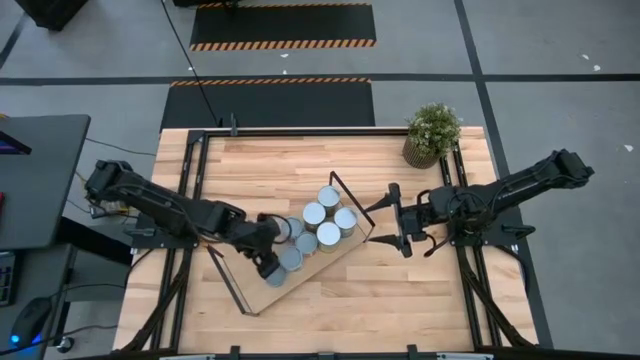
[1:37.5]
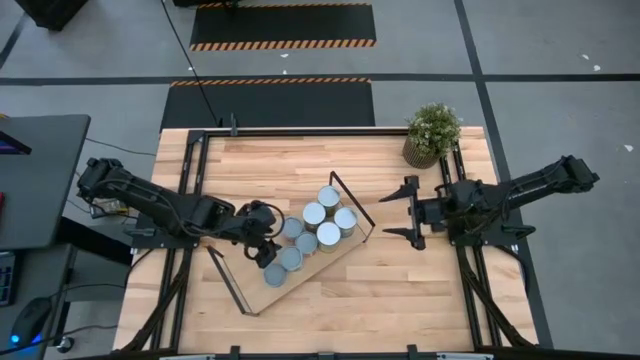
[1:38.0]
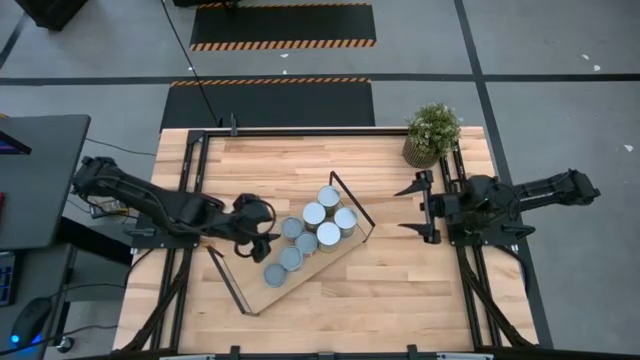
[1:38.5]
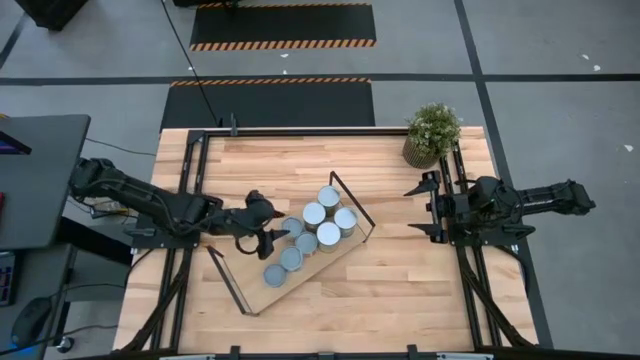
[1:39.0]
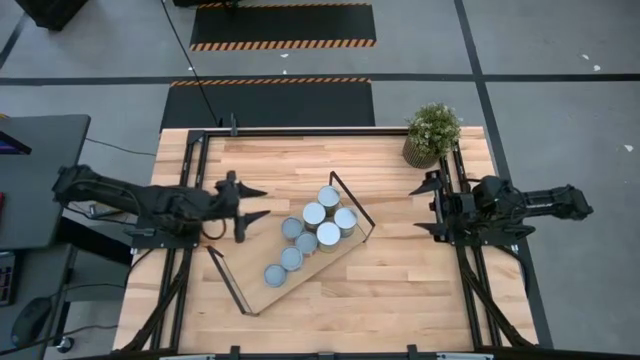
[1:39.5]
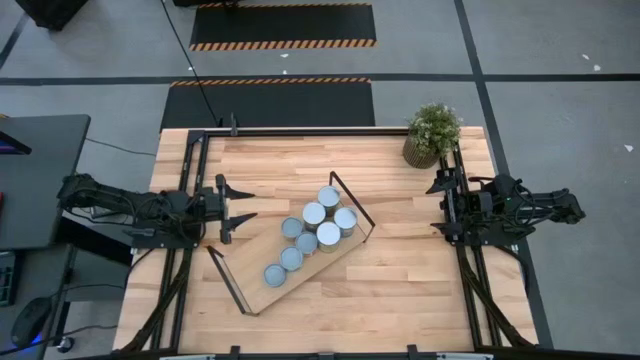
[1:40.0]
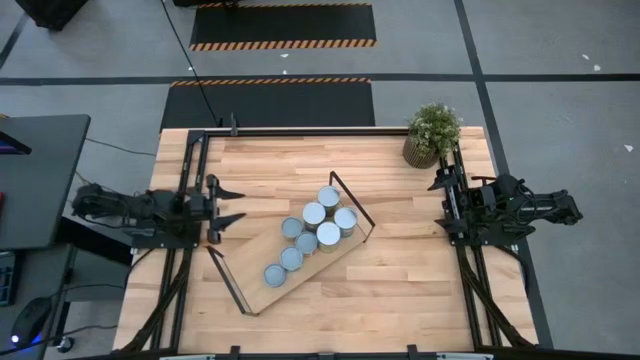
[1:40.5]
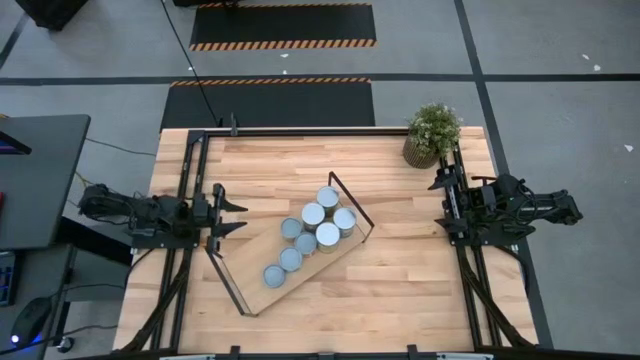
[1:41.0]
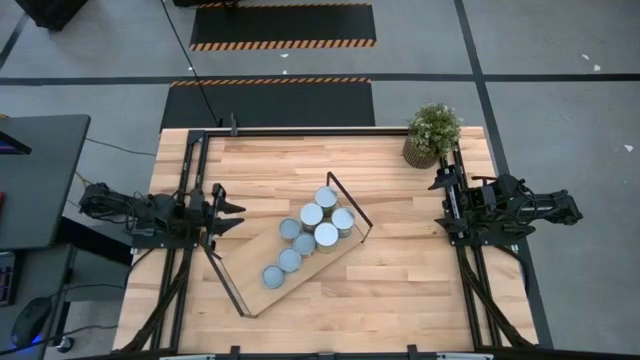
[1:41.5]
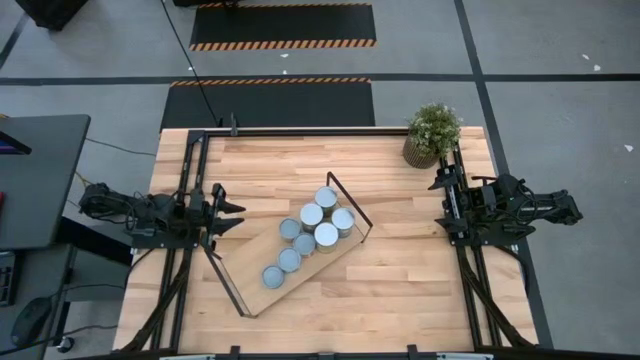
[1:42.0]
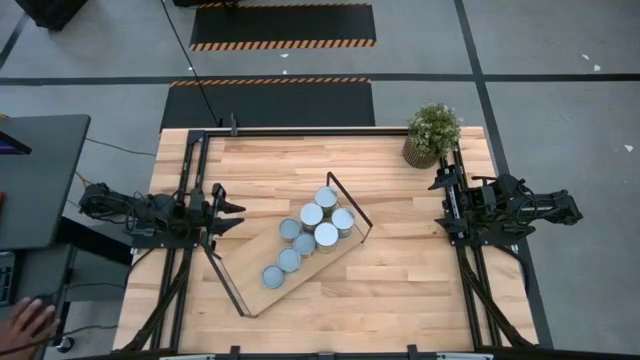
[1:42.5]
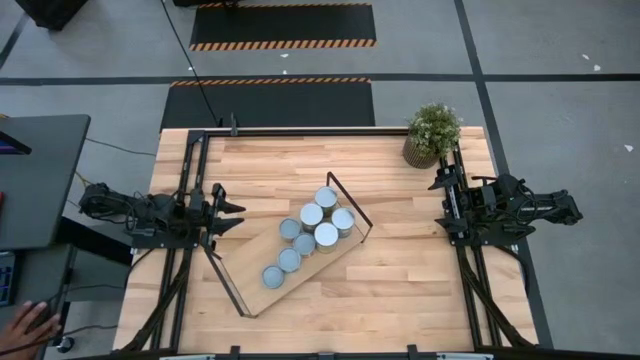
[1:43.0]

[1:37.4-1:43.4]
Task: Pick and place cans onto a shelf
Return to Home Position

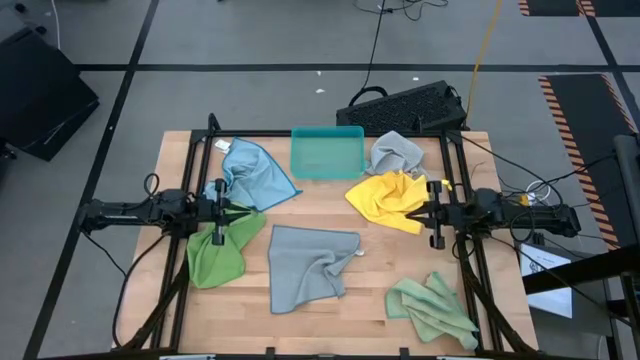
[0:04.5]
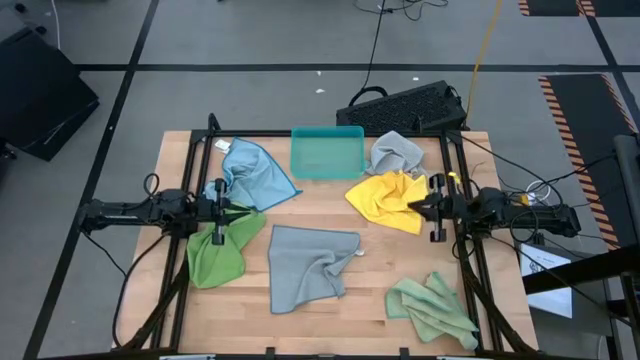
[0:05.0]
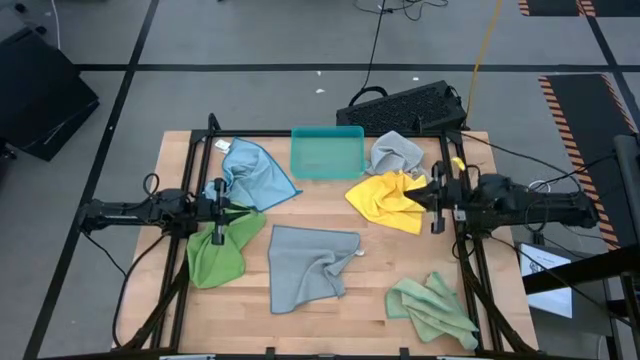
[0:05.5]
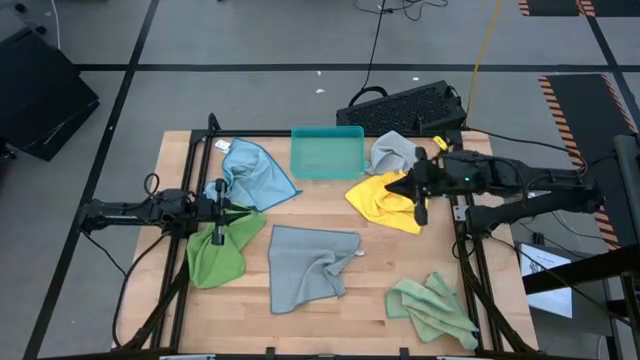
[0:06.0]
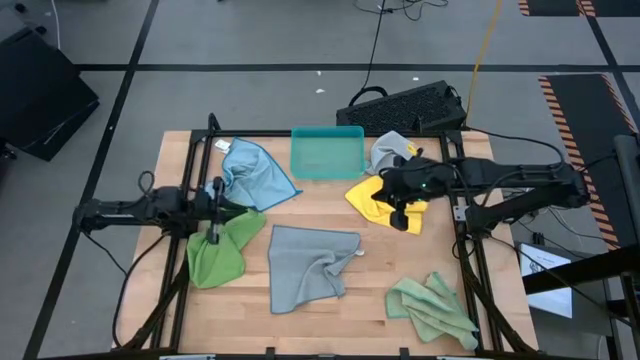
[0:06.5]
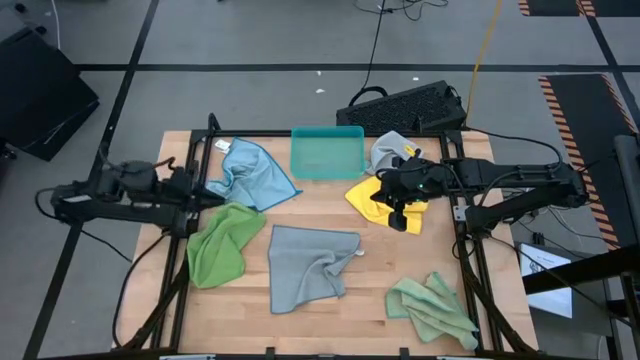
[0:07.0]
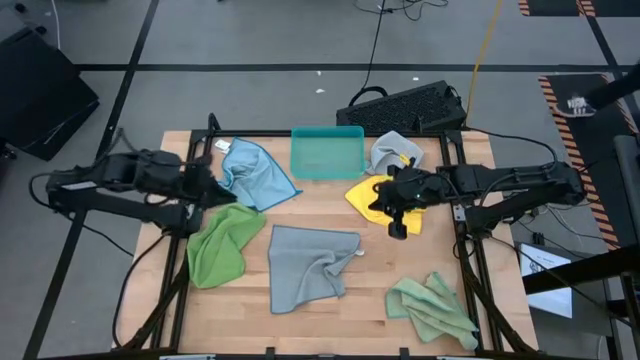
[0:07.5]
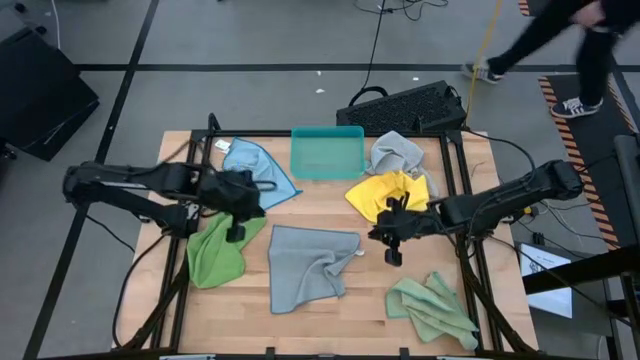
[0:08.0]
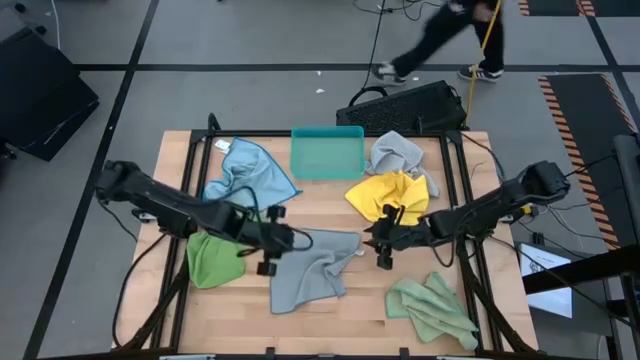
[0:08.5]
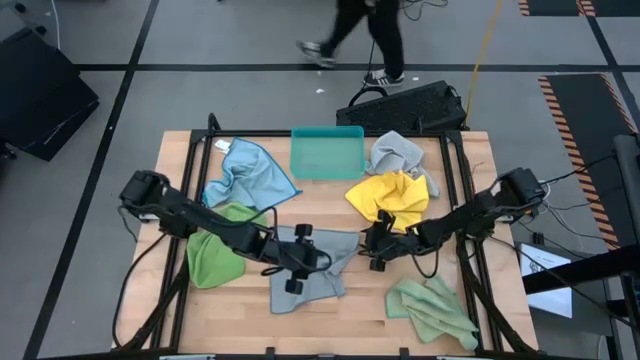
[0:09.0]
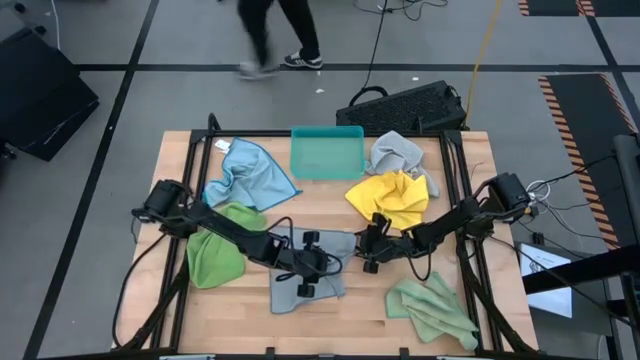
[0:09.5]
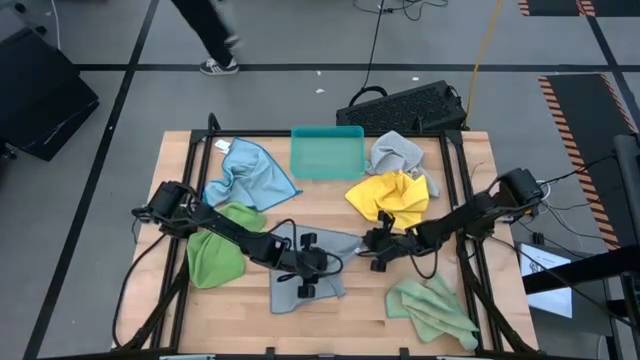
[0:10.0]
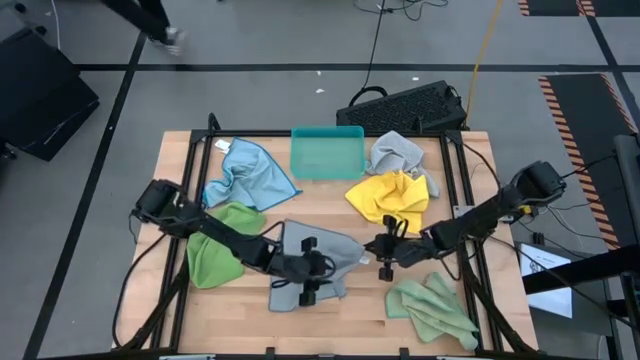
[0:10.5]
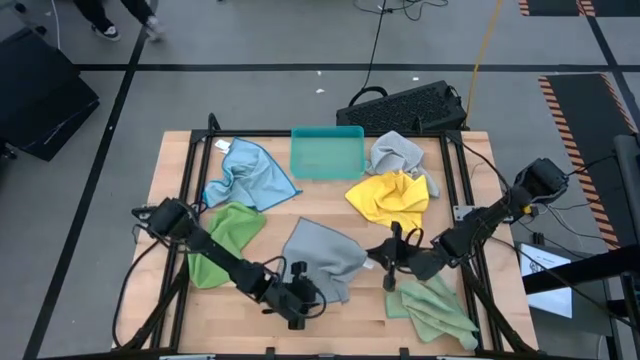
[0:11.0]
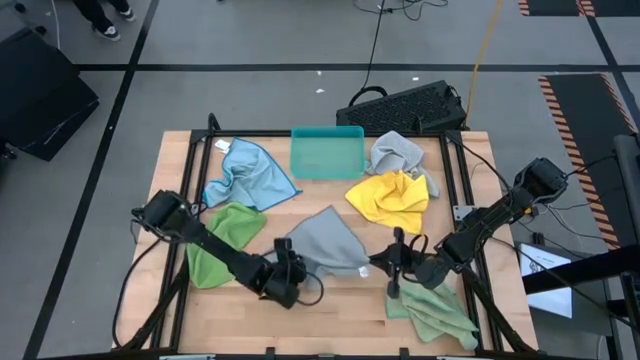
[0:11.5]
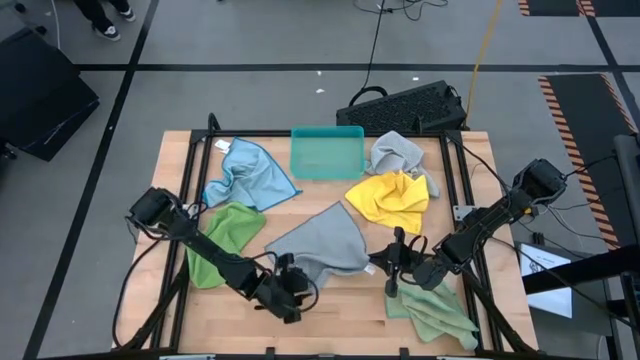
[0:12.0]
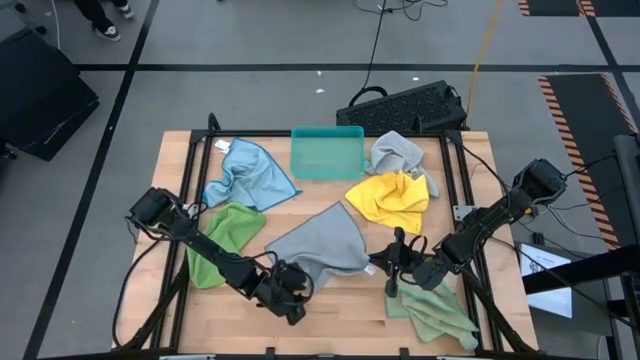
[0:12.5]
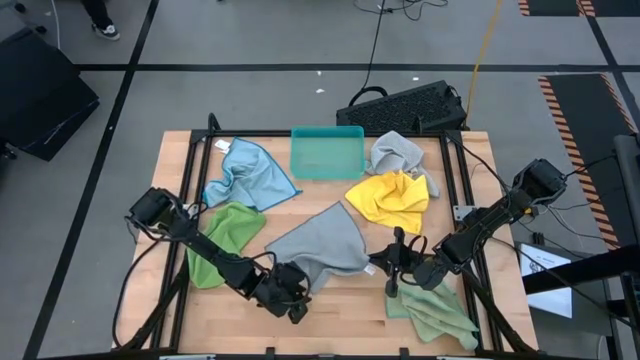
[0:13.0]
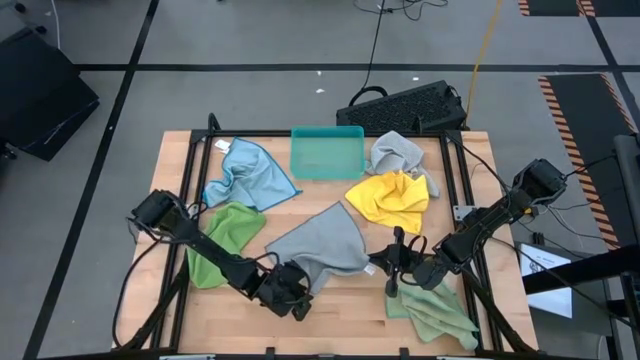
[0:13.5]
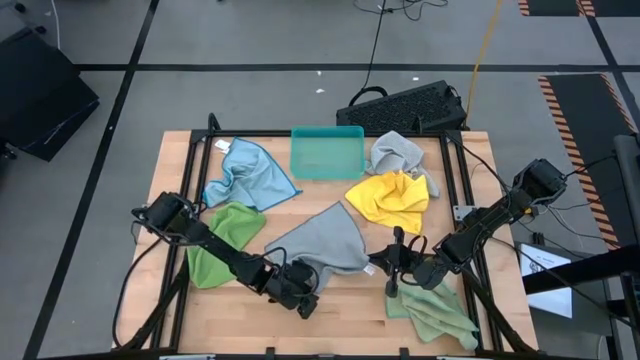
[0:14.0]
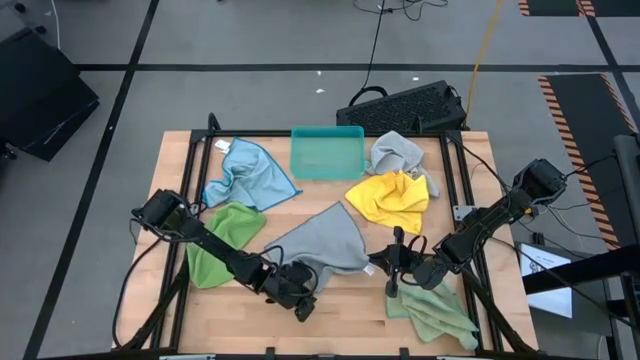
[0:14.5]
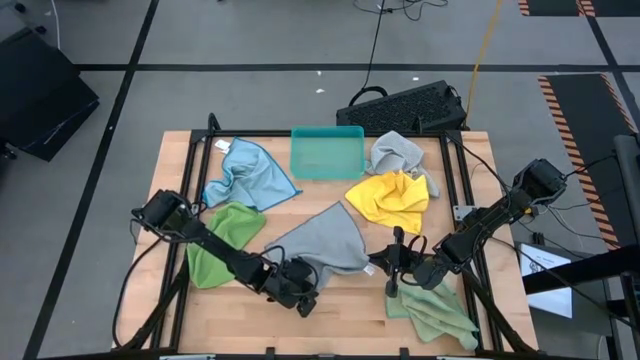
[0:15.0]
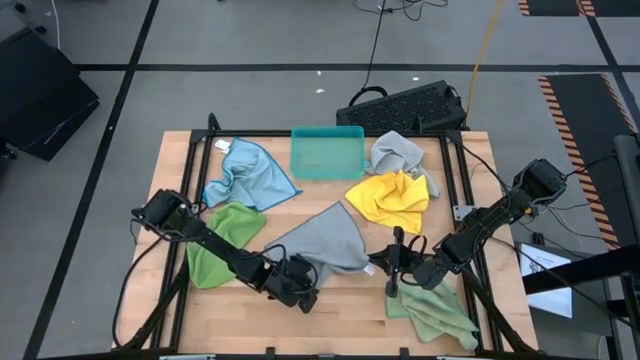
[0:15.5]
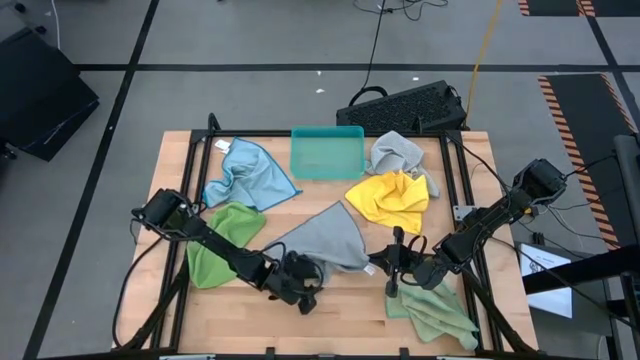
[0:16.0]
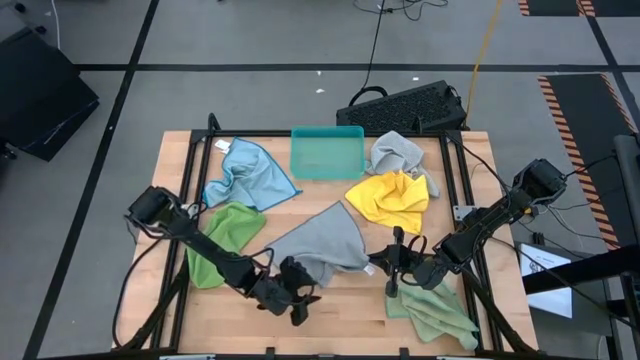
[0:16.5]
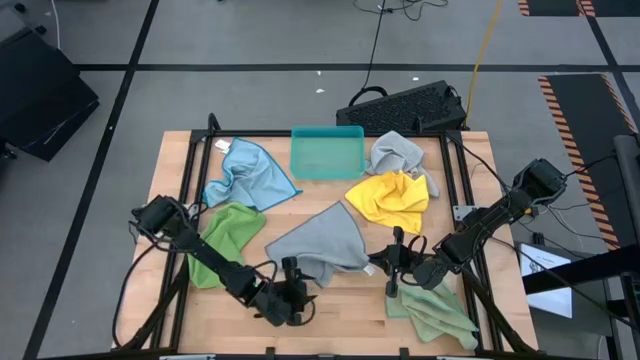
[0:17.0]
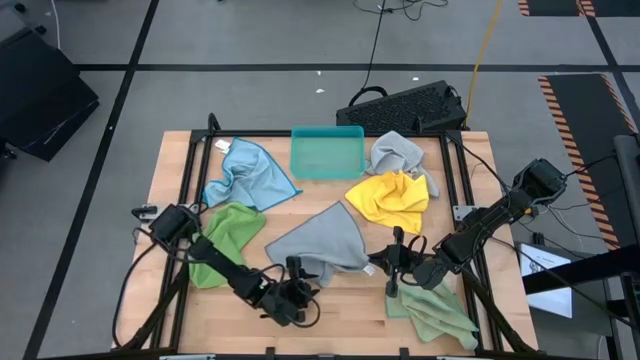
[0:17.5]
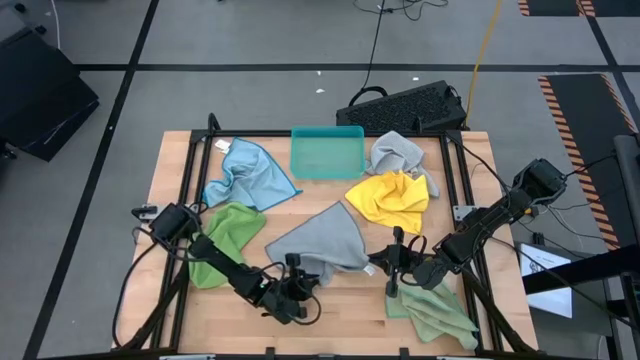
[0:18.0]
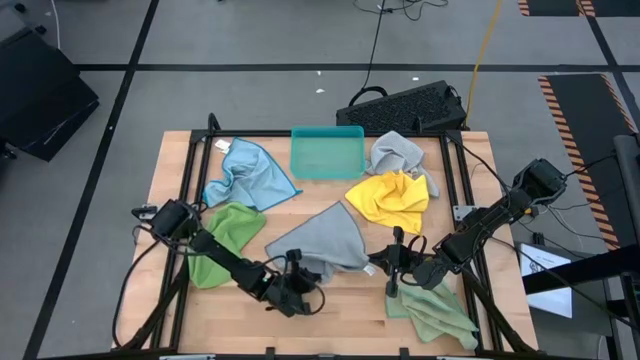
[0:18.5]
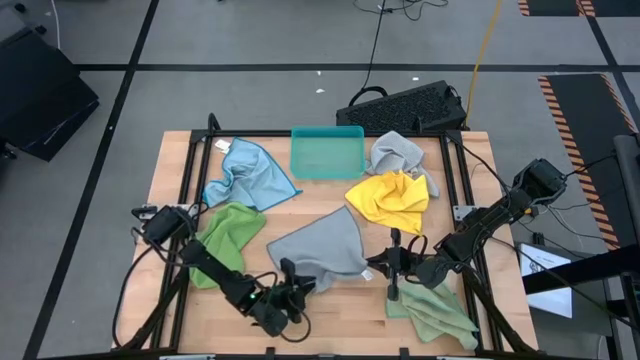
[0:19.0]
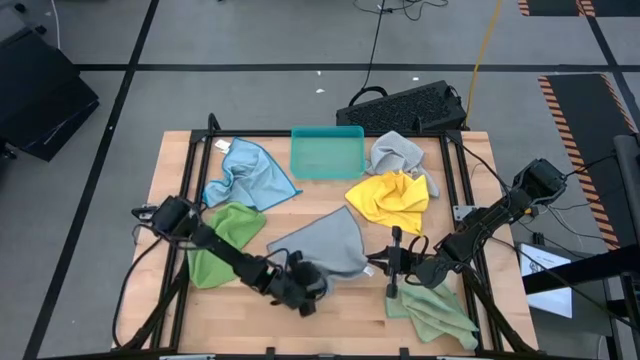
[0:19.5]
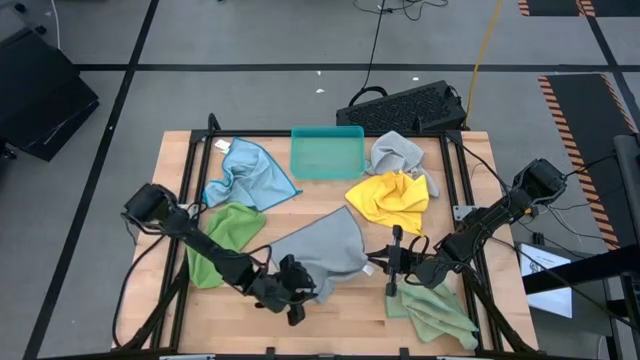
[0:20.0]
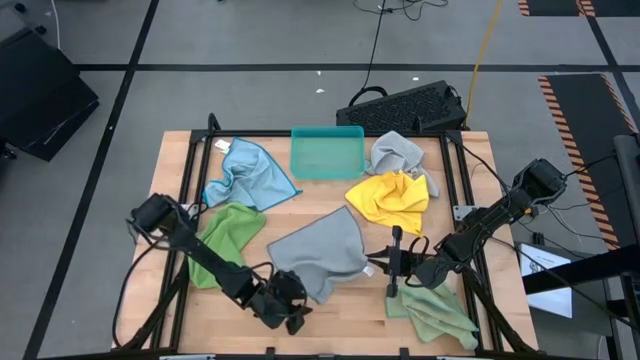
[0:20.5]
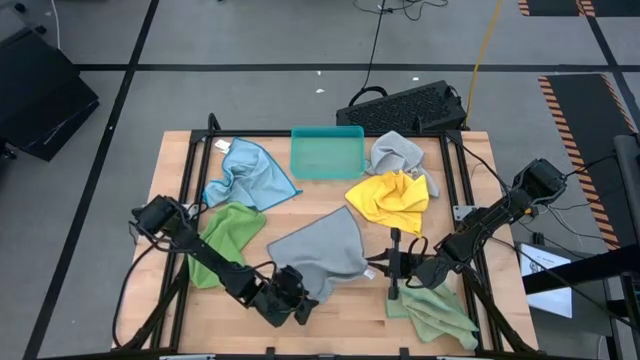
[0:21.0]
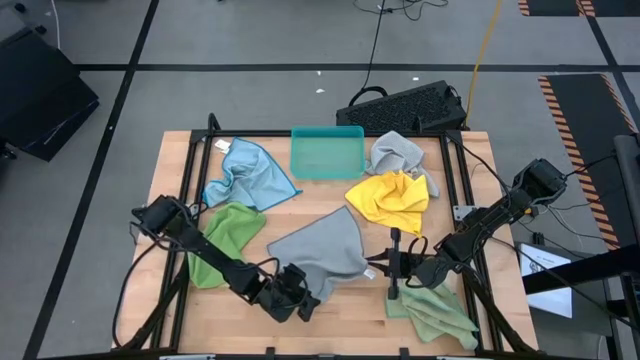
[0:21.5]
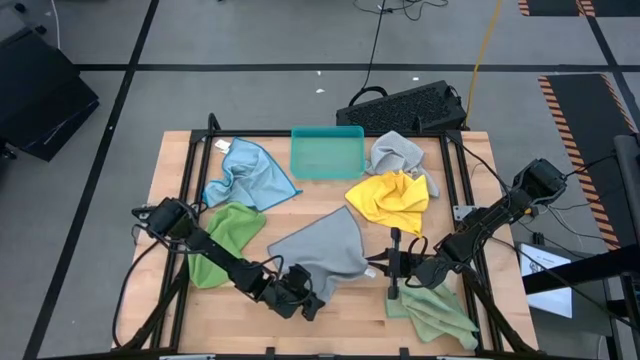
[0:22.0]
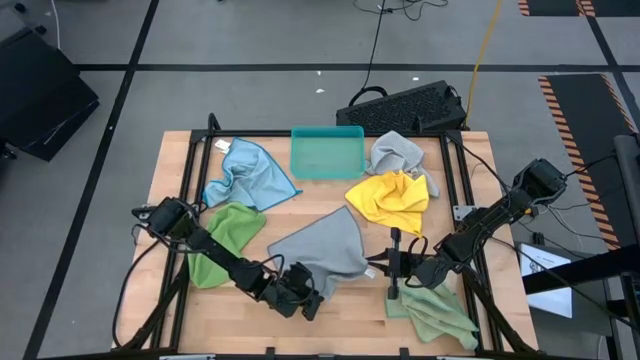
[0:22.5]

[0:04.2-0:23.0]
Task: Fold microfiber towels
Fold the dark gray microfiber cloth
